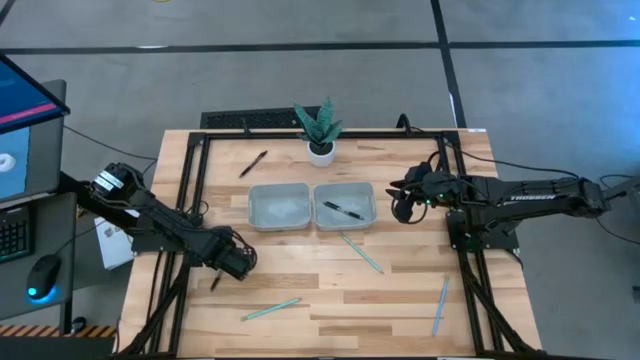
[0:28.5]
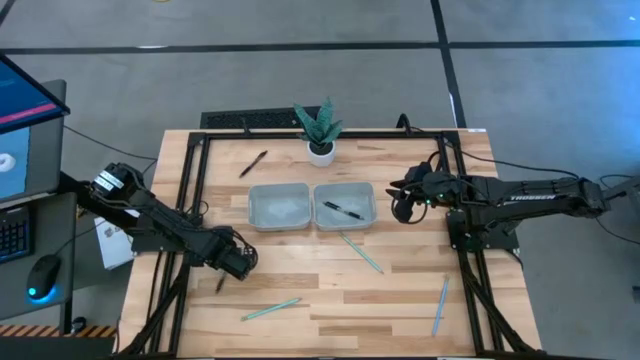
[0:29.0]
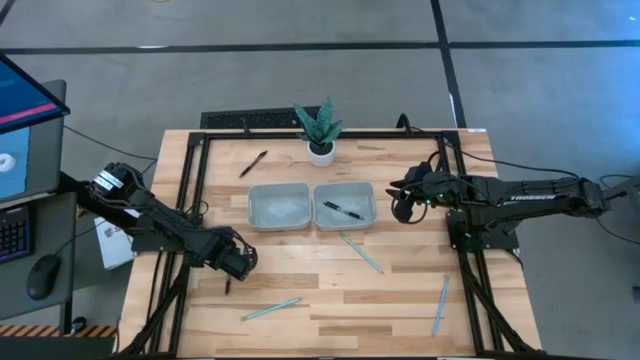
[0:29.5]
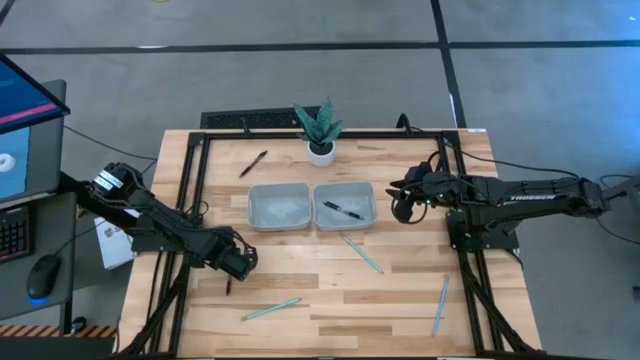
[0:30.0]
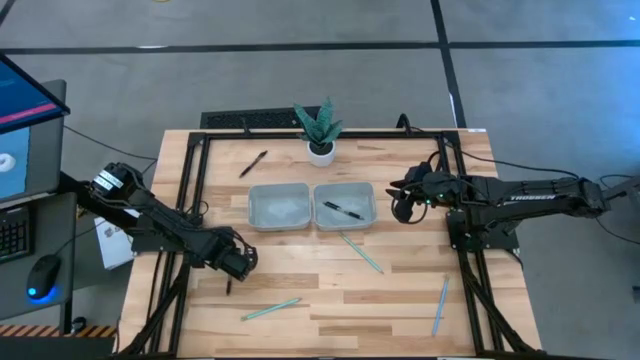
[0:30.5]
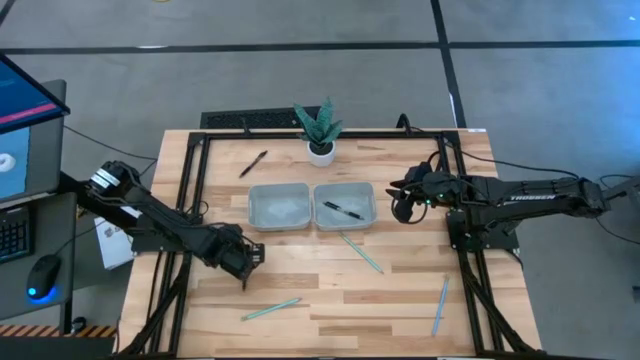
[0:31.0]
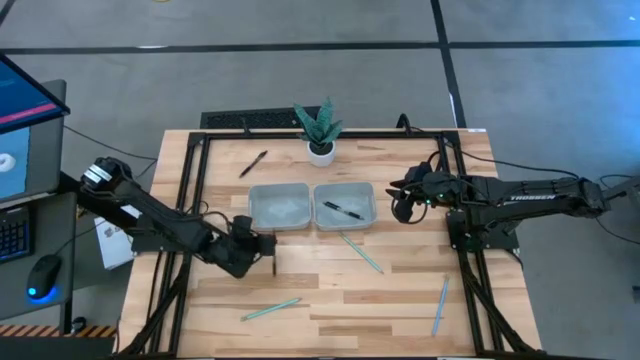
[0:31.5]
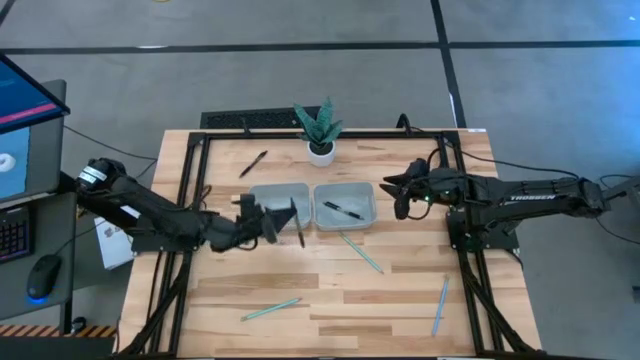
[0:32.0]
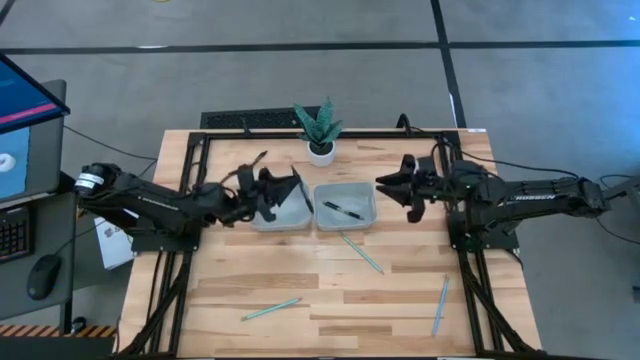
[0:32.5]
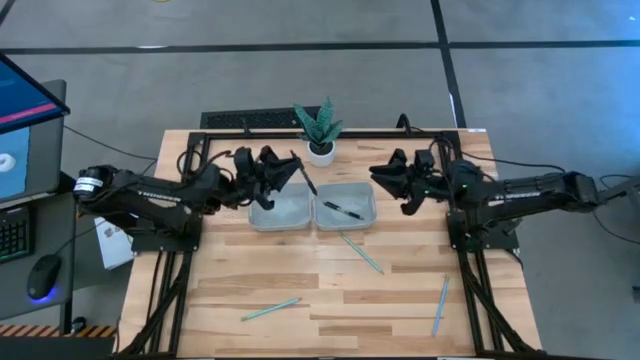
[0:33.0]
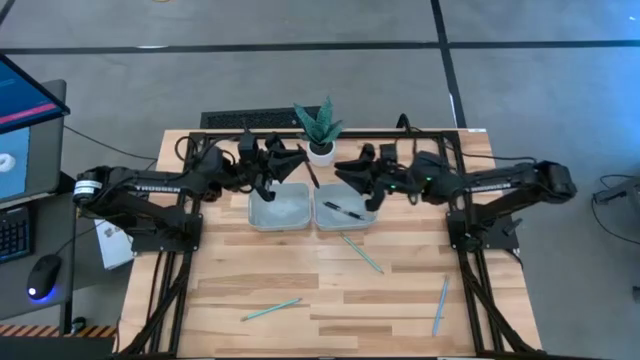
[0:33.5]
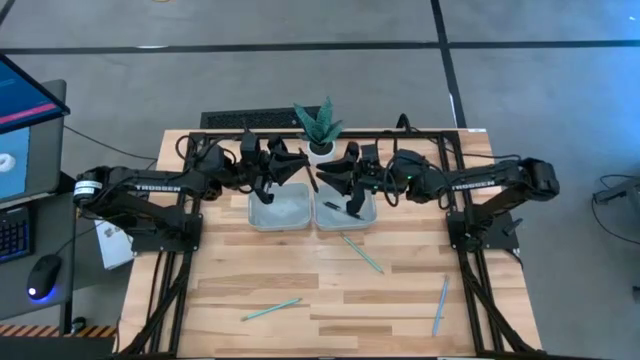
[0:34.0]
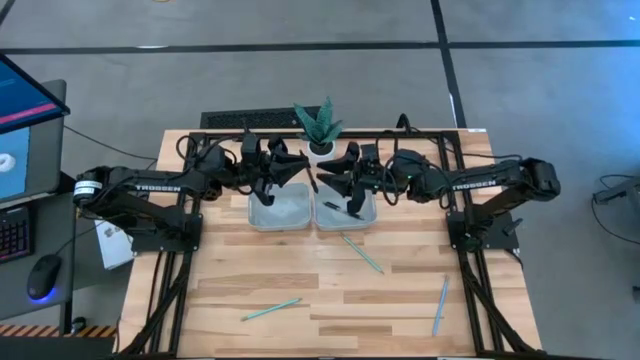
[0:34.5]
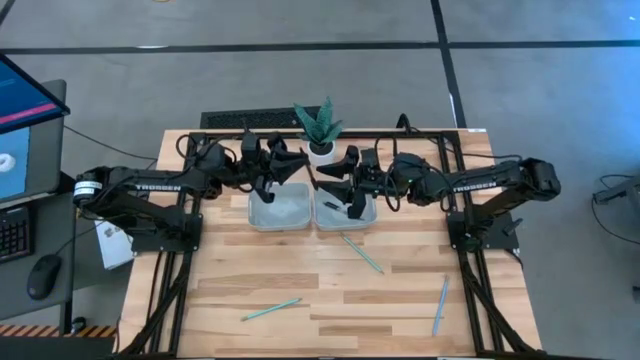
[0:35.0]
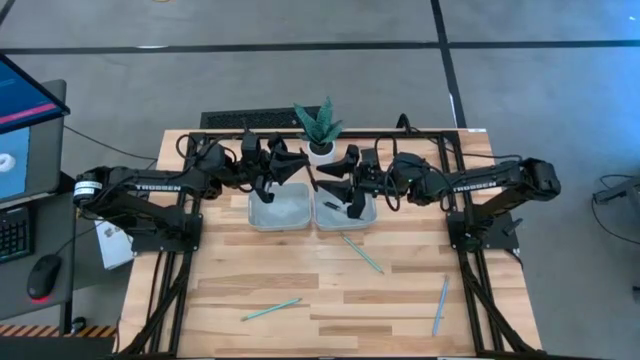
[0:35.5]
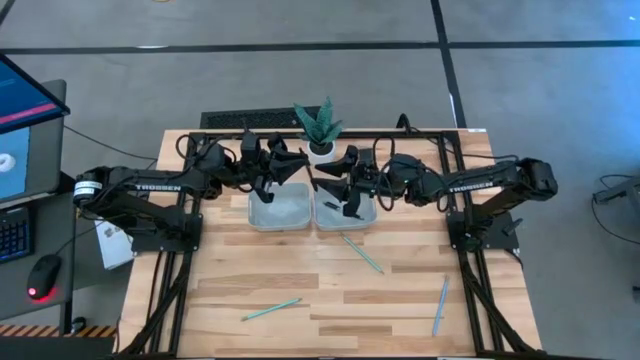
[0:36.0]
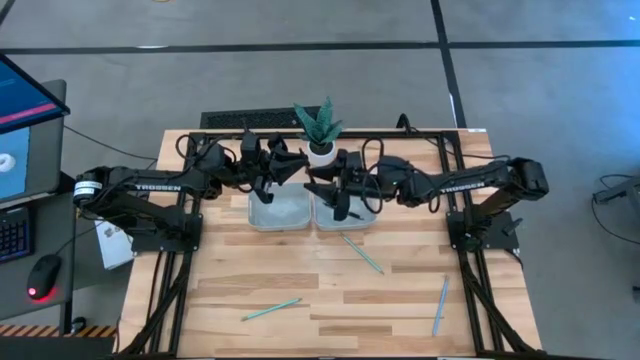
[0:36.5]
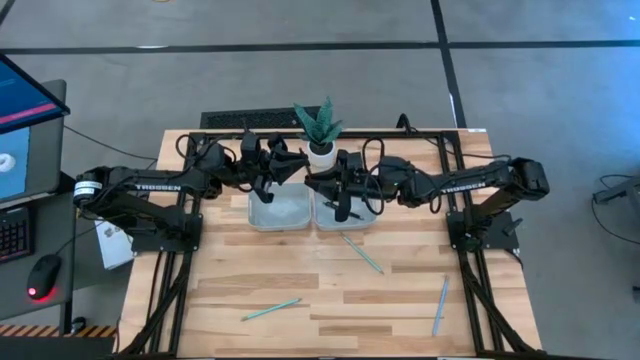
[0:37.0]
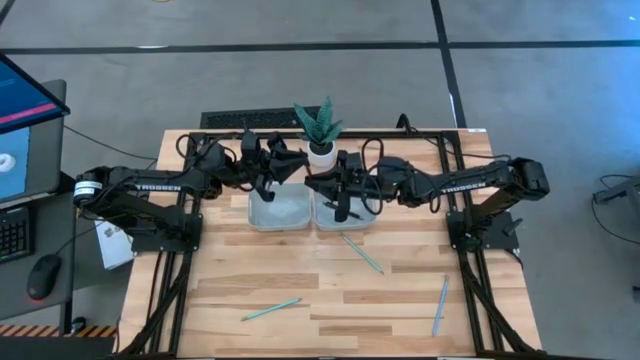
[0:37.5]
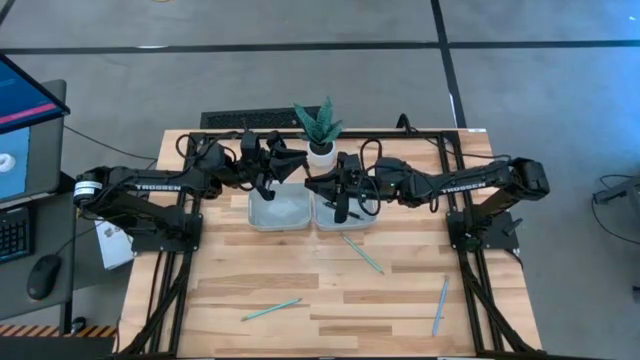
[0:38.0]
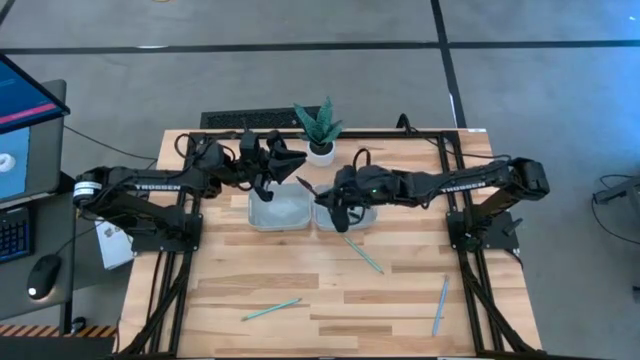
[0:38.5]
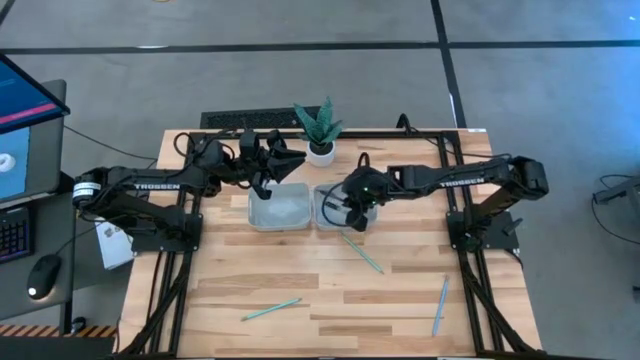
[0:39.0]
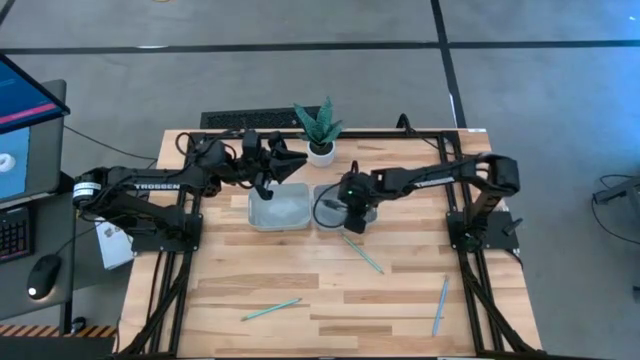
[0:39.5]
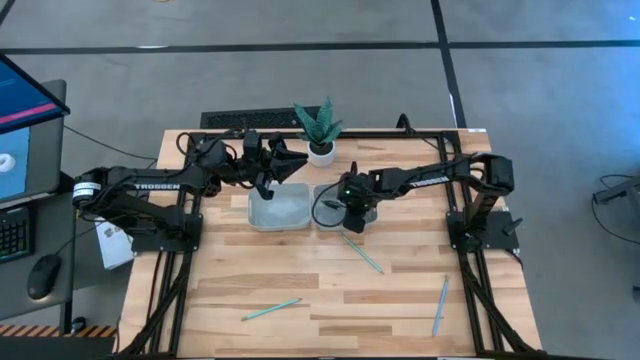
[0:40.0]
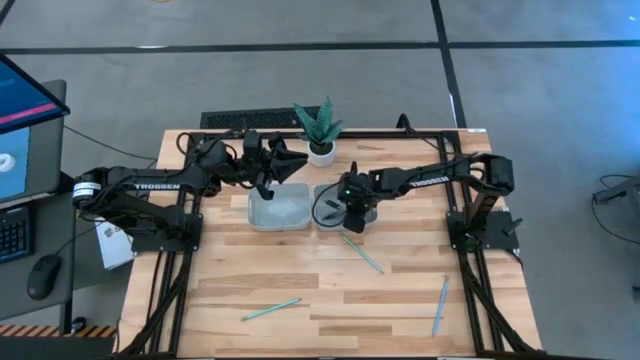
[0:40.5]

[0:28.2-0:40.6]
Task: Sort pens & pencils
Put the bottom black pen into the right gray bin

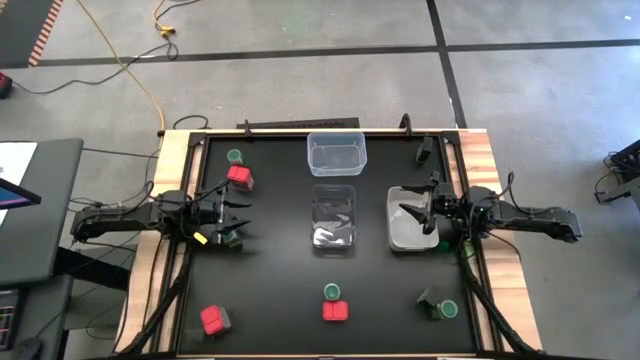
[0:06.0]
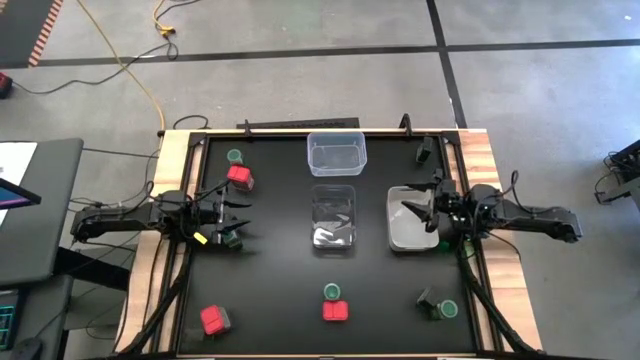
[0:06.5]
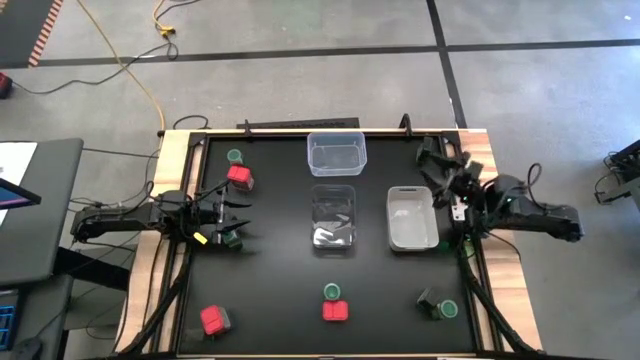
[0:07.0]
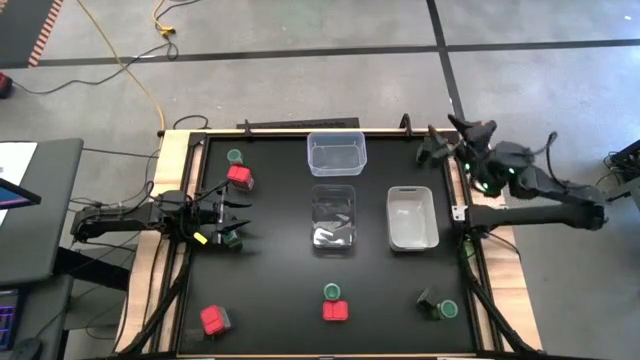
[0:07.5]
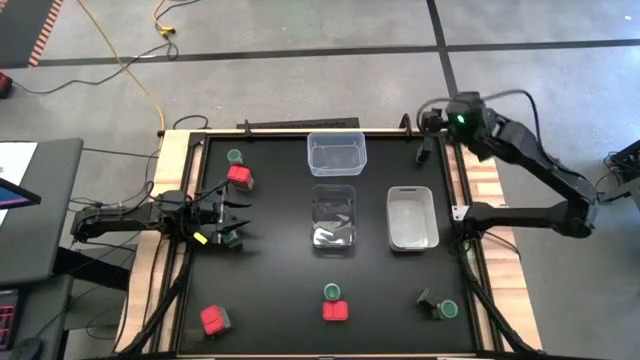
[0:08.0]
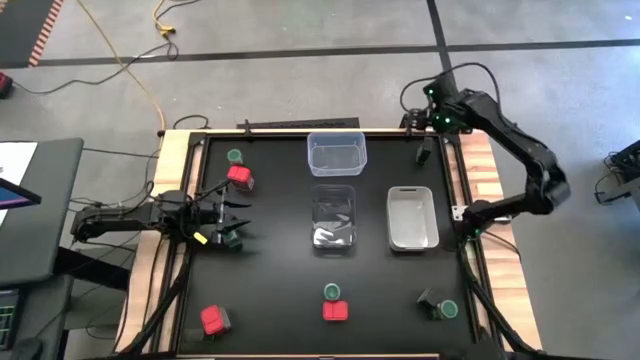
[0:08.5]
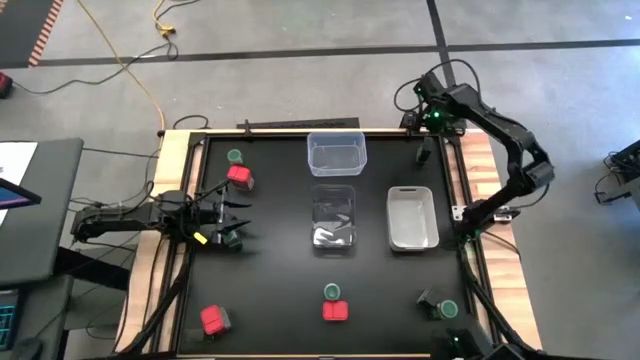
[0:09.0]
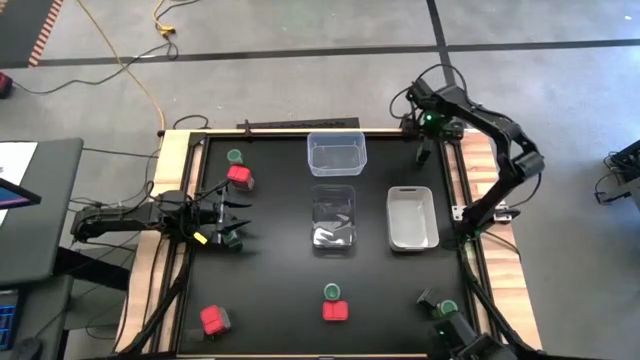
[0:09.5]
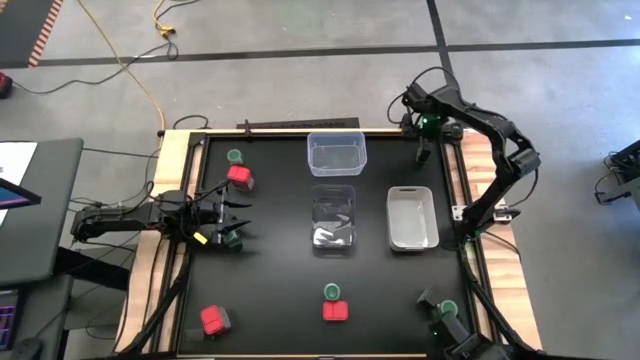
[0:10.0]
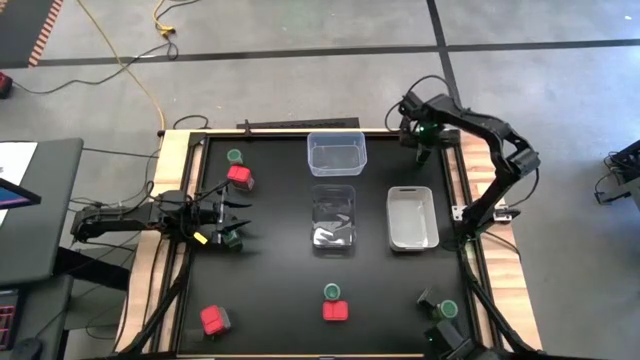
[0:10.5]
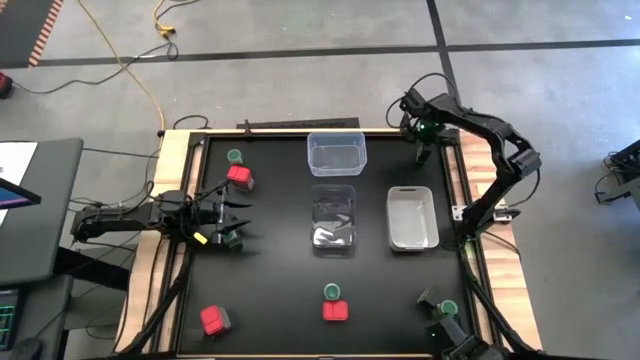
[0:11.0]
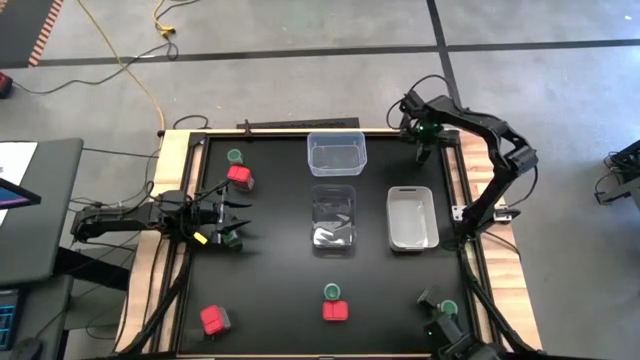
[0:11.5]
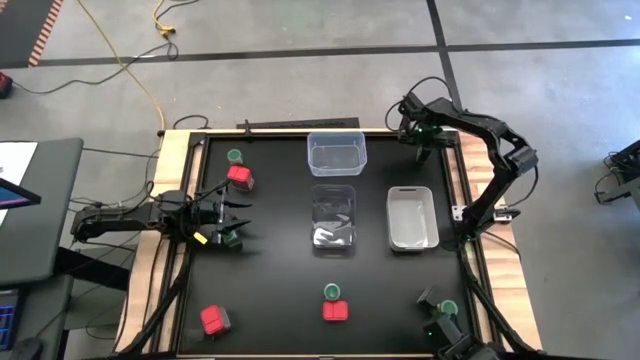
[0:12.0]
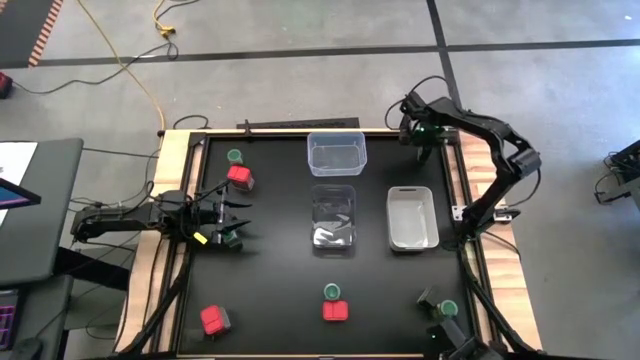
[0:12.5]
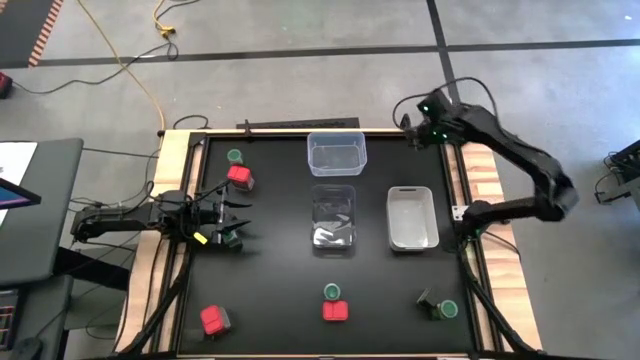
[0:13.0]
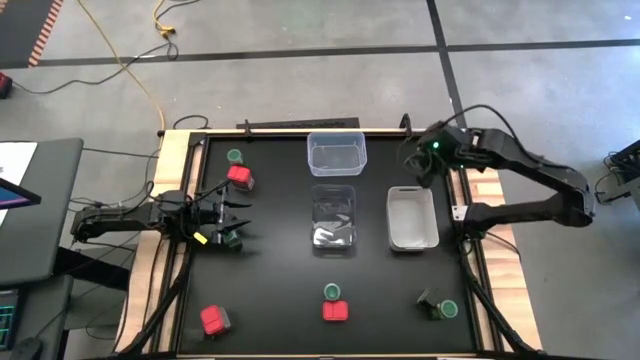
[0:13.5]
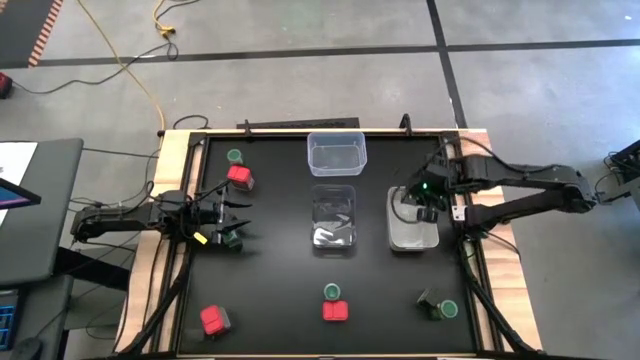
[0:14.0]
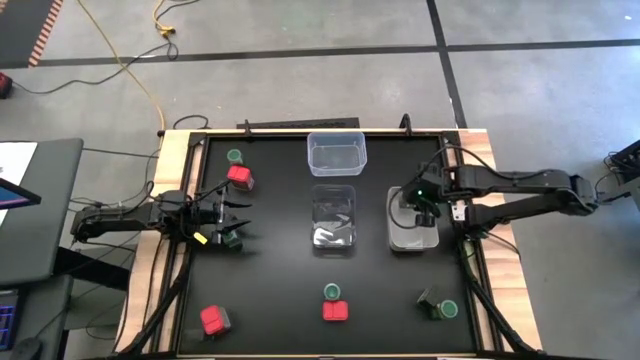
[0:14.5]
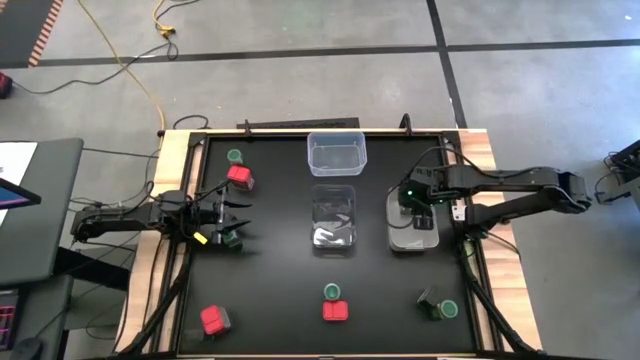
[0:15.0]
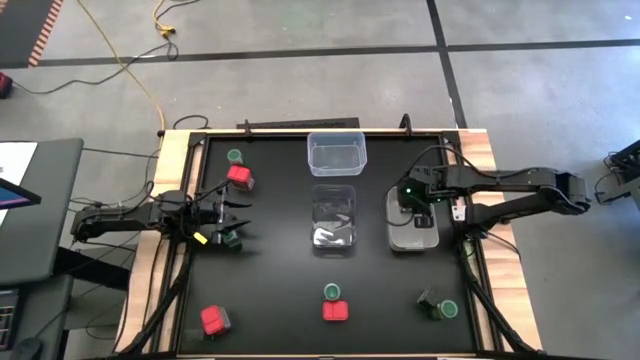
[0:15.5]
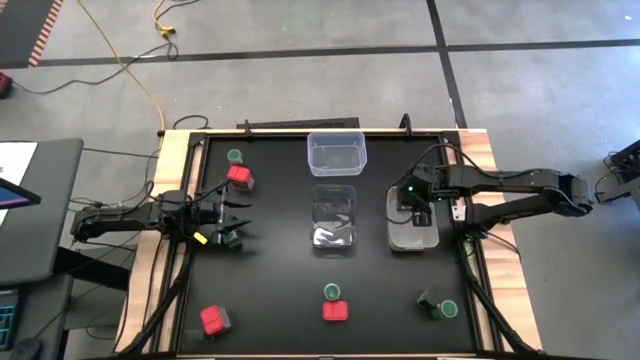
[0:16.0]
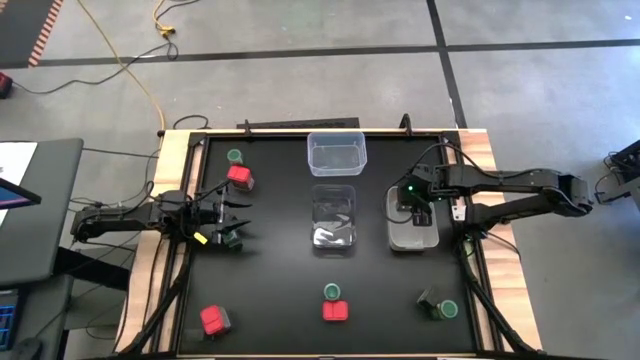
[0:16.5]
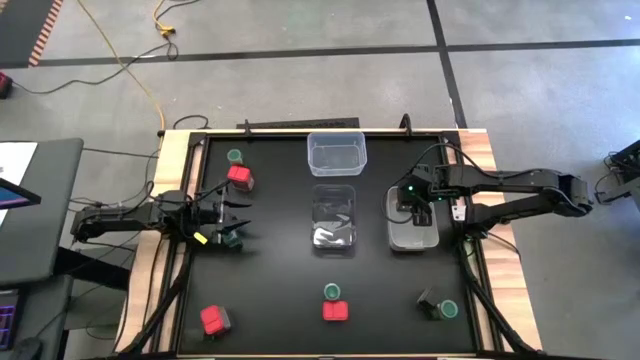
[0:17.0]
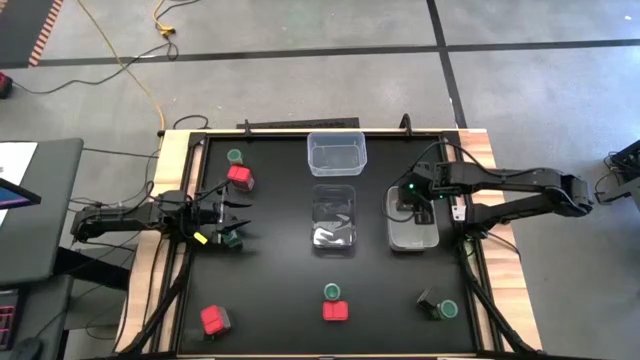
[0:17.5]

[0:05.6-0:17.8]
Task: Sort spices by type
Put the black seasoning can into the gray bin
